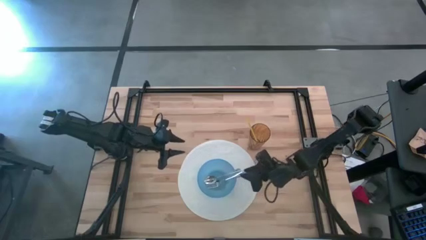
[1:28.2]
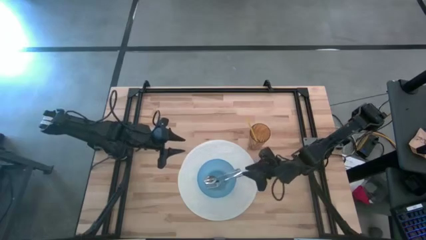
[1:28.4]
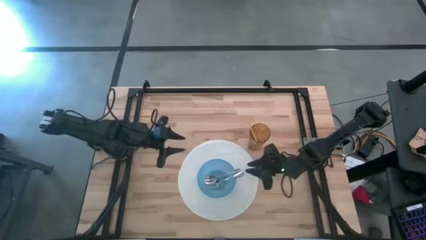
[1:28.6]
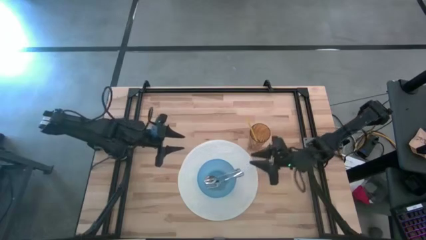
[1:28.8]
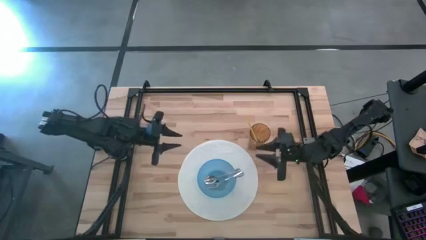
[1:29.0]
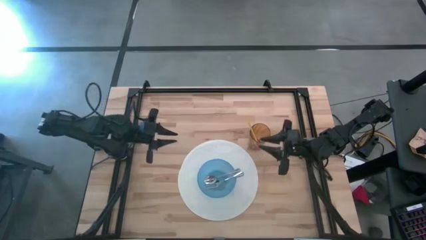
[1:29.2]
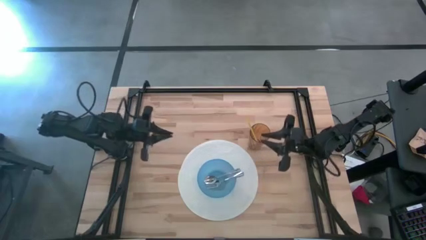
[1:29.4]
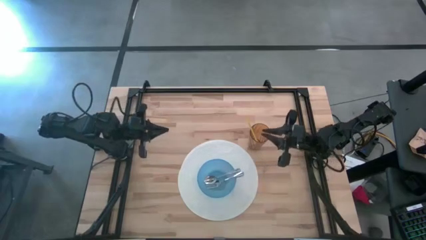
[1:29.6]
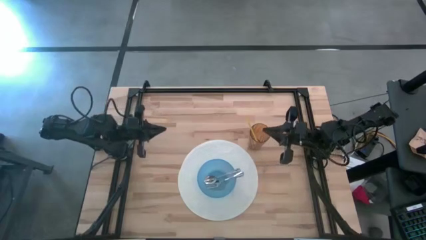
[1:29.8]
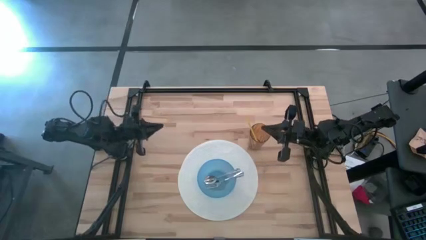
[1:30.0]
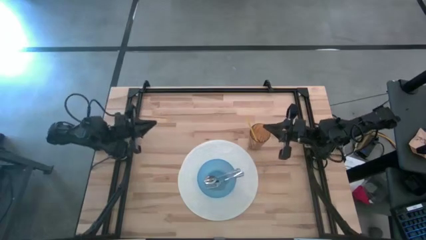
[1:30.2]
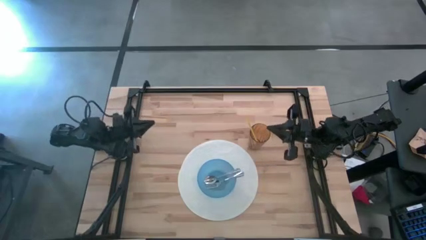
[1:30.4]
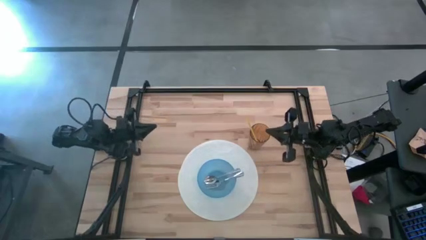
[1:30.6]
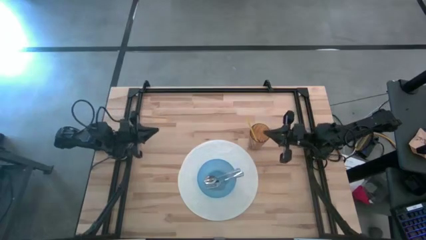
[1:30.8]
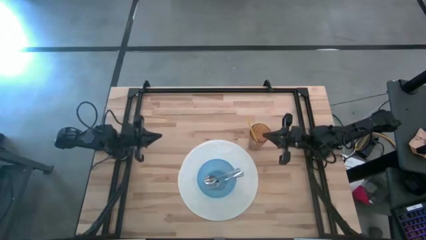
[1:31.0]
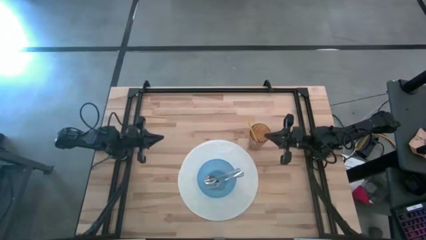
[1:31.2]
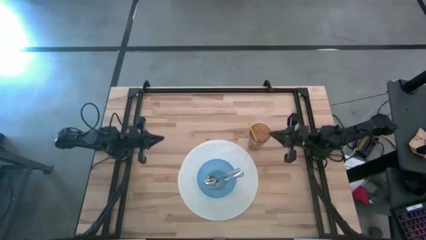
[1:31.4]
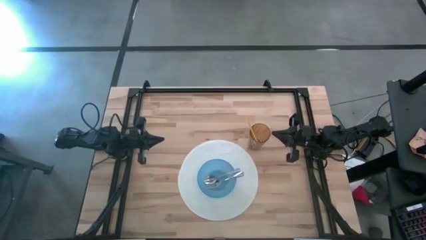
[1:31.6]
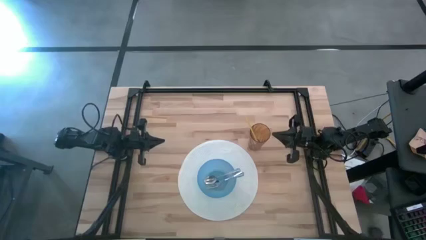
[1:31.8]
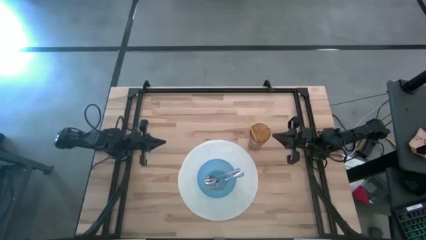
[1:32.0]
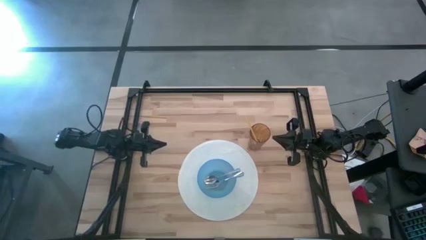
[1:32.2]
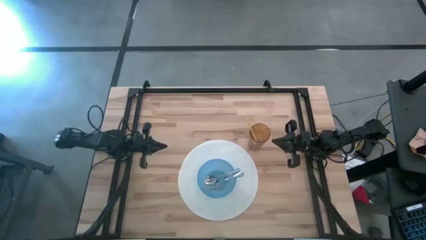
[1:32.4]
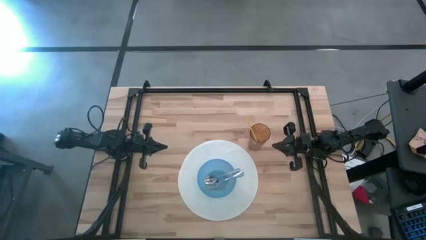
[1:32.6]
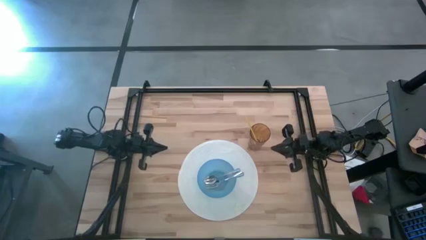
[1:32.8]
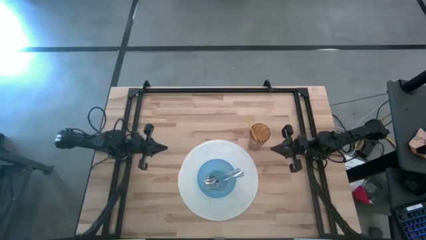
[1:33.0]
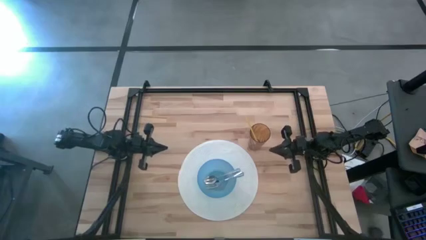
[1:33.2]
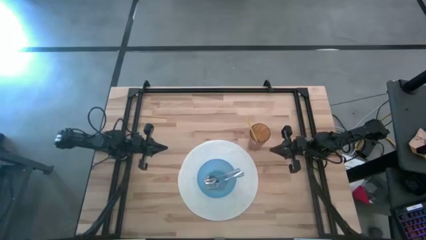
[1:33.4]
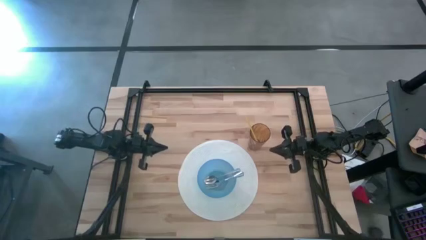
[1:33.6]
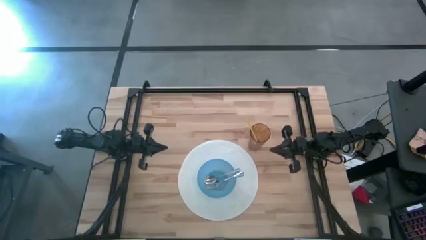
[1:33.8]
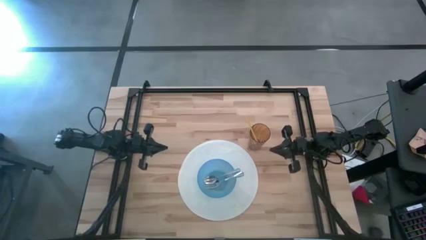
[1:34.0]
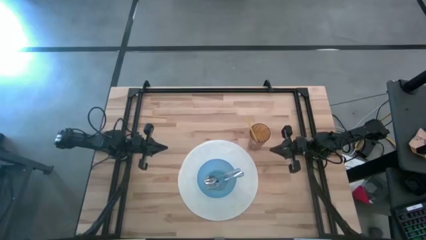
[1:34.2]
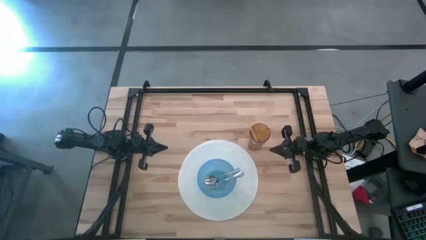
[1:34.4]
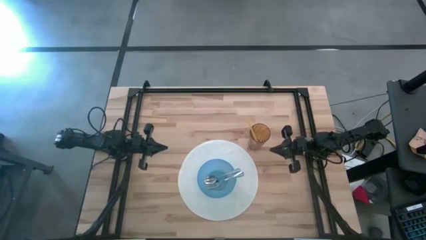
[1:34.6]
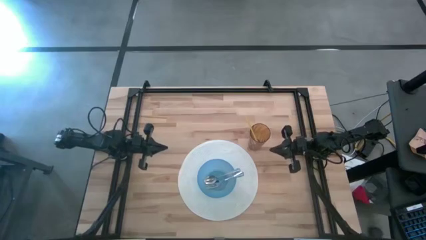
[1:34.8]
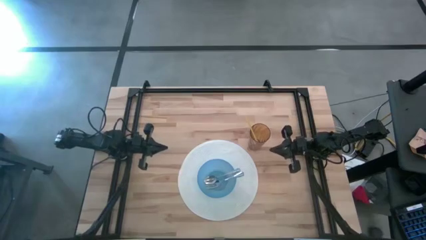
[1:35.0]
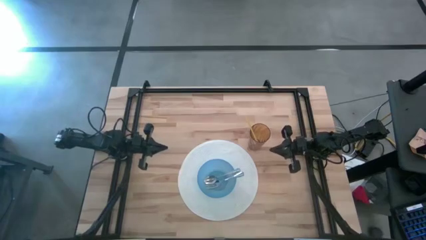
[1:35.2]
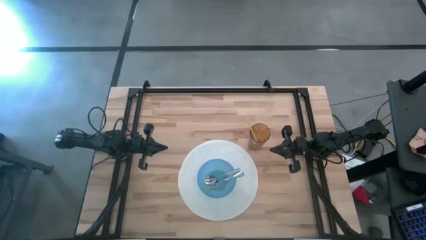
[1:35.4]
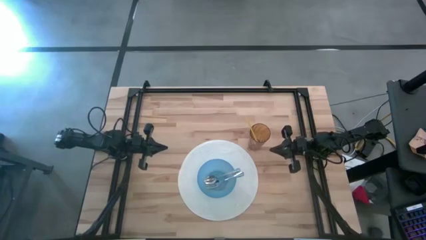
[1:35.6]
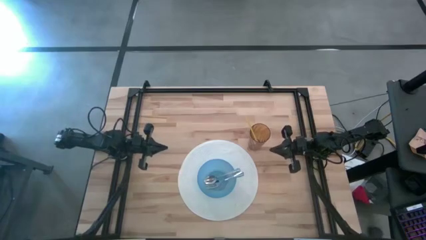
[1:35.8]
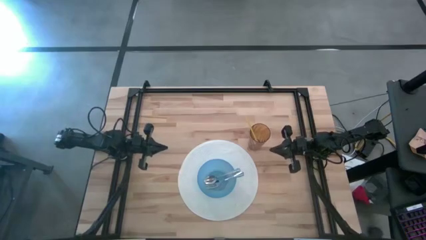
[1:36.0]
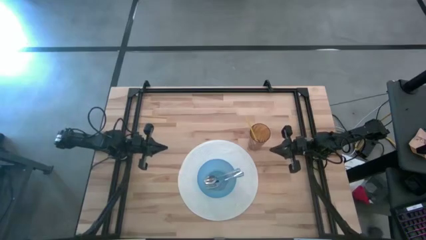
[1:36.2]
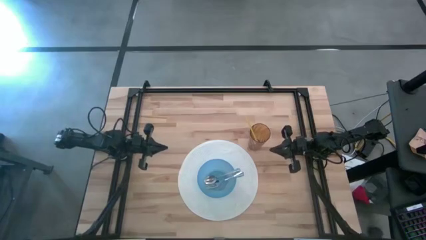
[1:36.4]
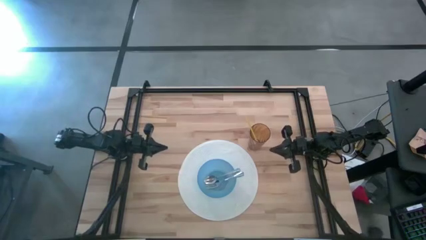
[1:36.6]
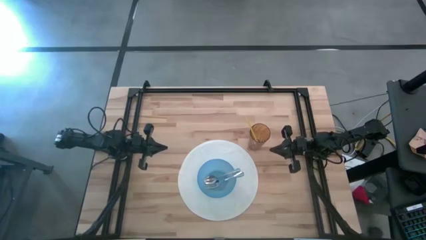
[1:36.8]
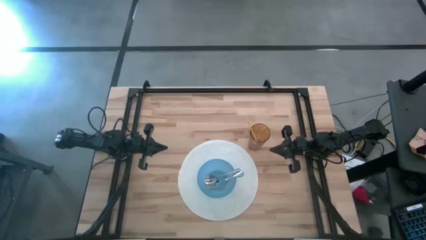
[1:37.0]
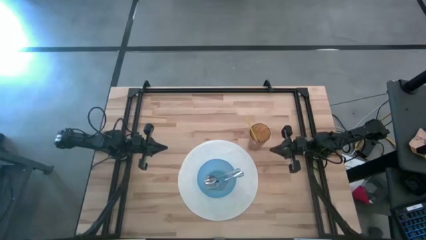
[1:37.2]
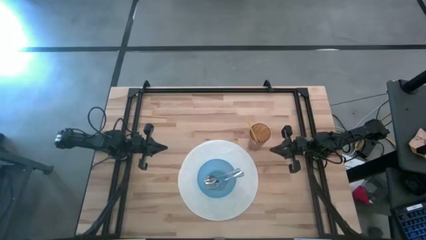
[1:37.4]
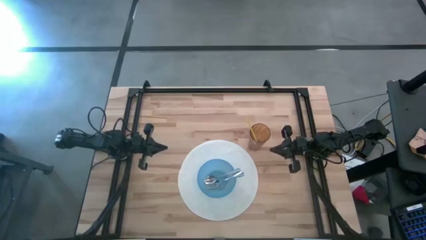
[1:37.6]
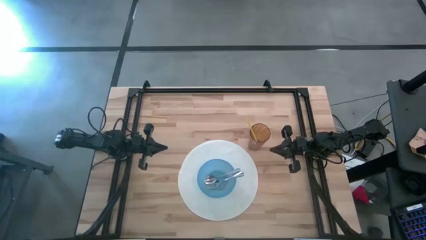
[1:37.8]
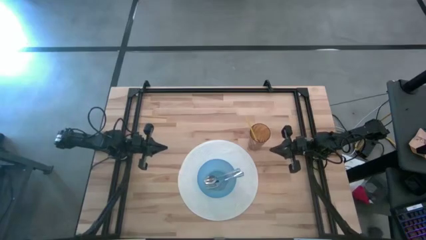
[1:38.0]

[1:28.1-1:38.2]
Task: Pick & Place Utensil
Return to Home Position

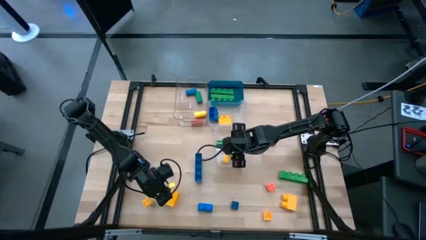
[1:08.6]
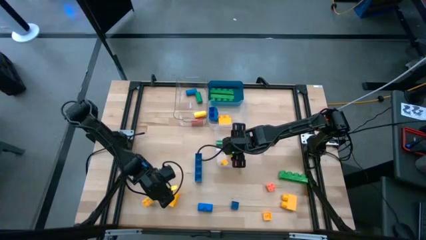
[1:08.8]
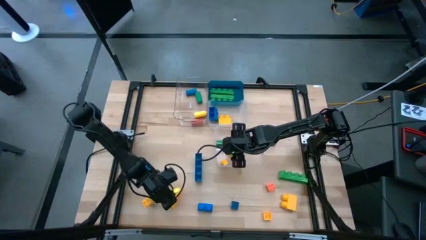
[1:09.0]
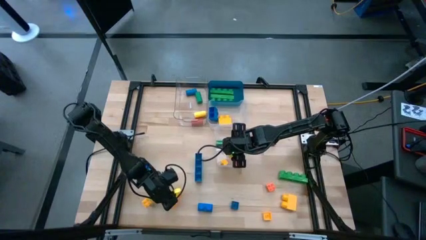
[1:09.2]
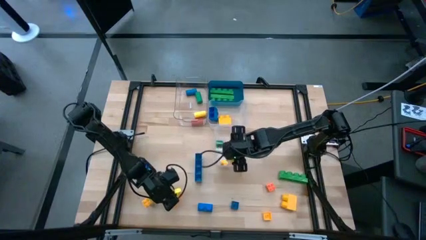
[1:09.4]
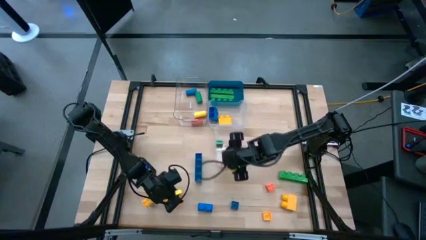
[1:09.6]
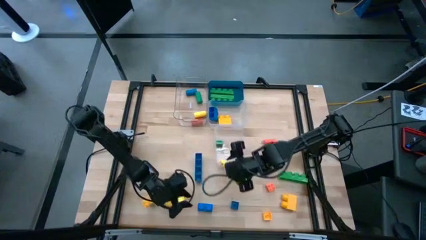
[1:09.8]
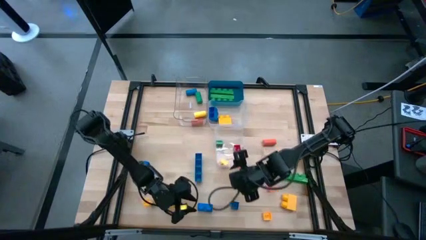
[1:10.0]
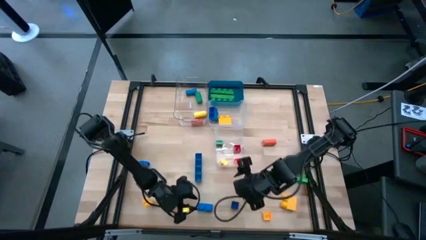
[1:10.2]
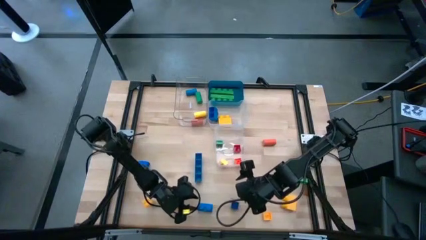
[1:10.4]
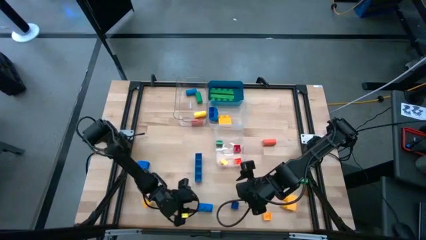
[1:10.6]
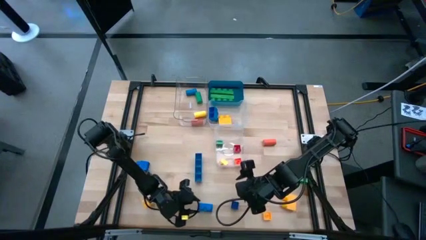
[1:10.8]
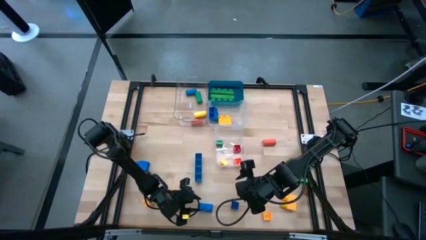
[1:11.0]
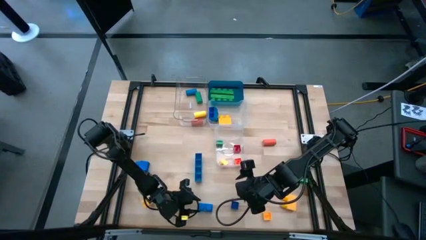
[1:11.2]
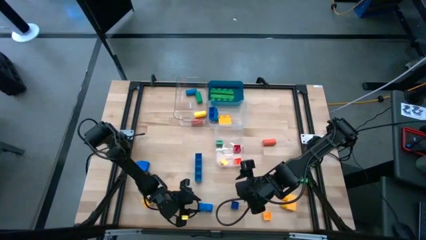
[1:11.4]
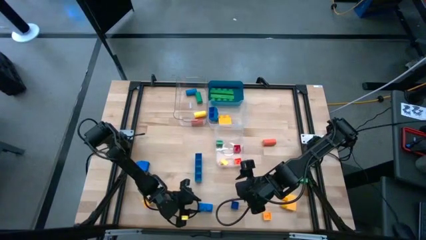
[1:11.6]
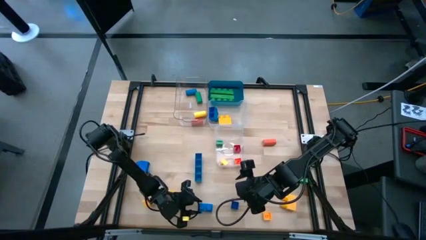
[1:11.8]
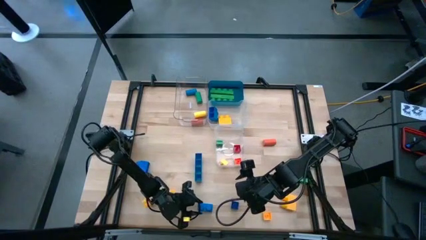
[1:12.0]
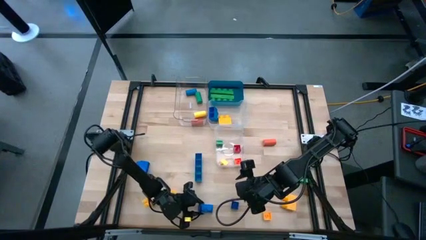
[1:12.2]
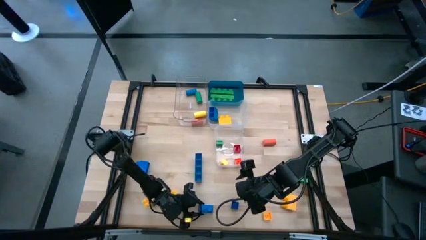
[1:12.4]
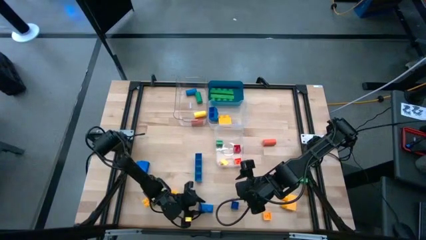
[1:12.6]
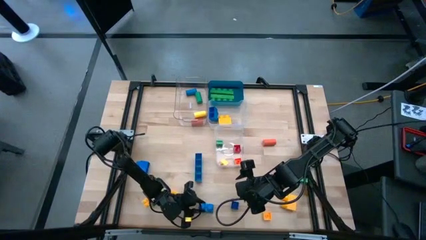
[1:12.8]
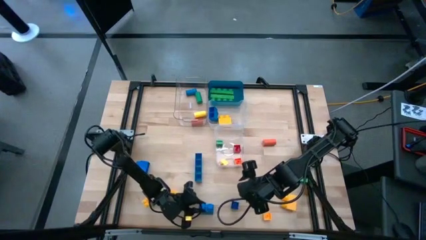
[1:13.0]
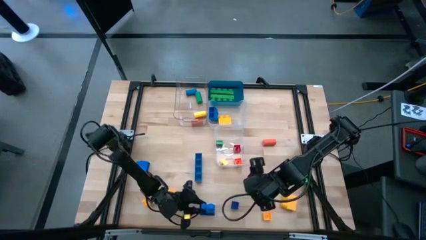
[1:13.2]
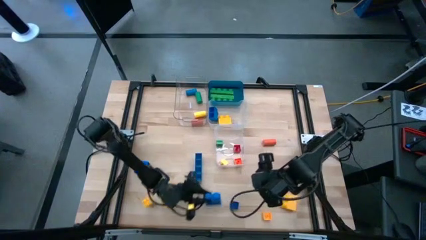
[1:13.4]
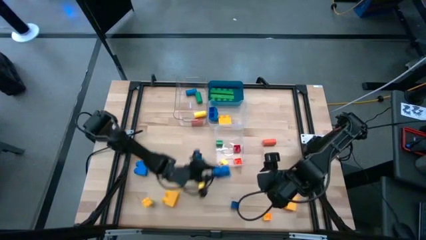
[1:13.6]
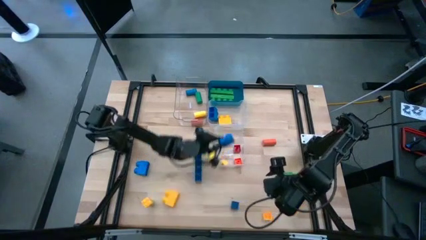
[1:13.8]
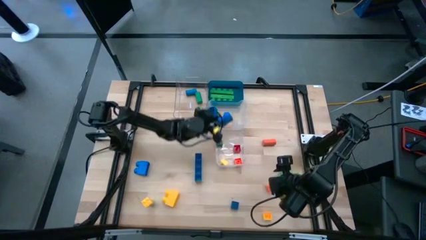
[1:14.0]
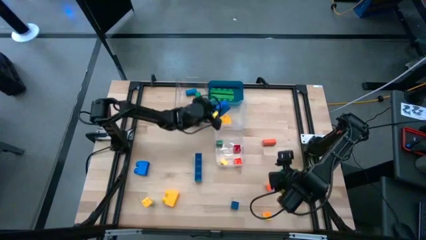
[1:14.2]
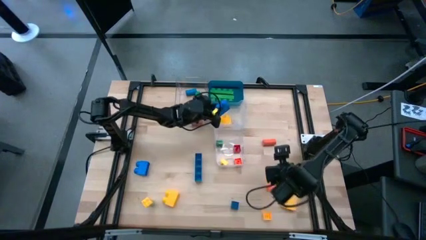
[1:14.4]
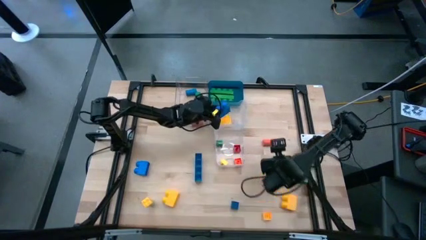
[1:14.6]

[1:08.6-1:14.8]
Task: Sort blocks by size
Put the blue 2 stud game piece into the top right transparent bin

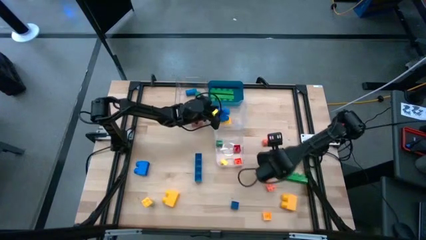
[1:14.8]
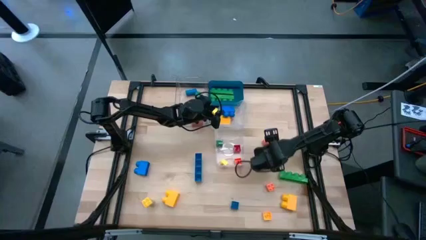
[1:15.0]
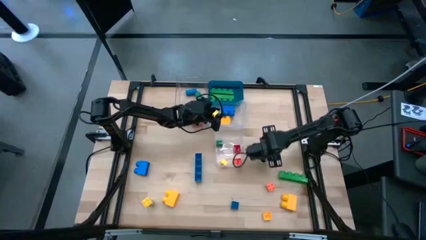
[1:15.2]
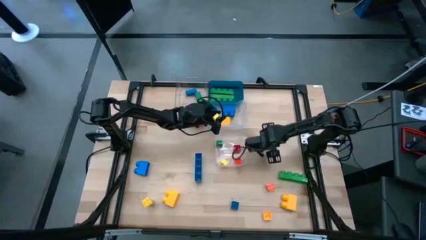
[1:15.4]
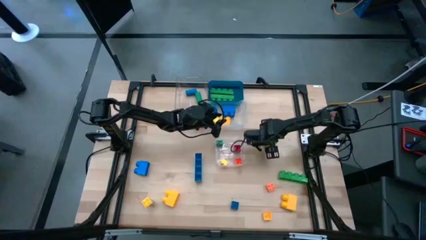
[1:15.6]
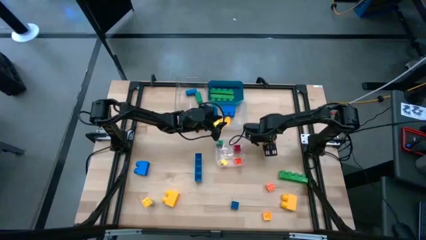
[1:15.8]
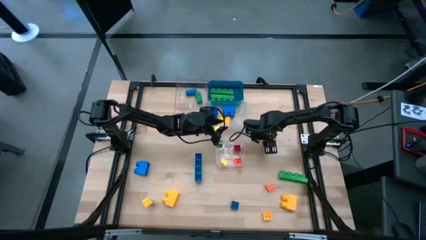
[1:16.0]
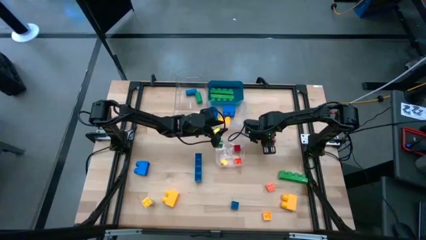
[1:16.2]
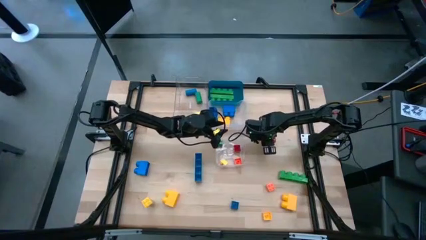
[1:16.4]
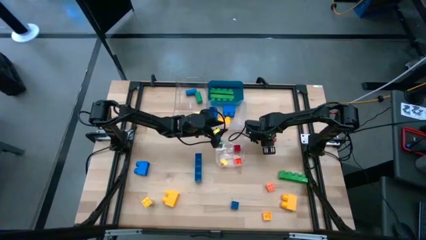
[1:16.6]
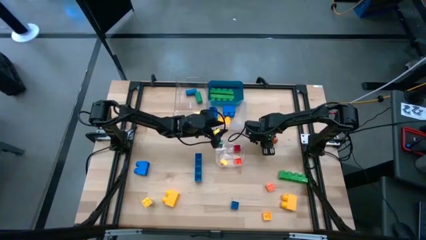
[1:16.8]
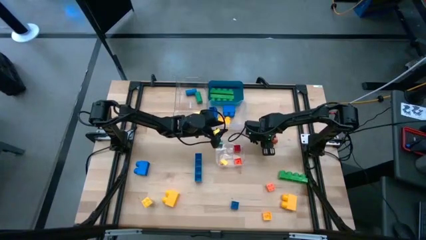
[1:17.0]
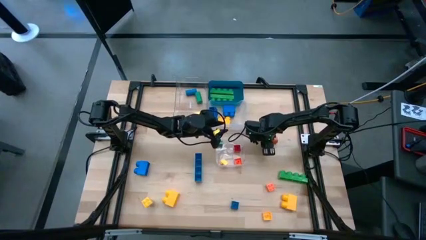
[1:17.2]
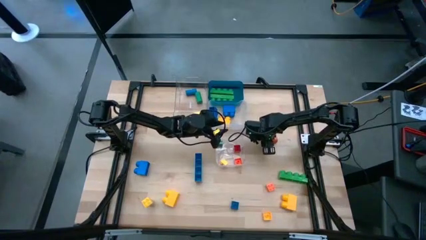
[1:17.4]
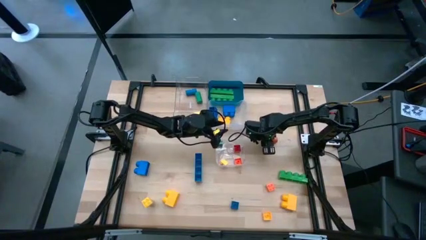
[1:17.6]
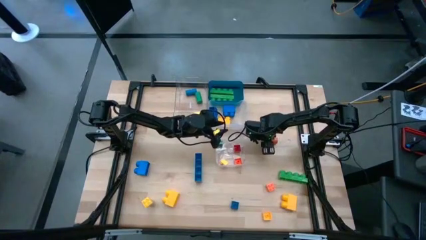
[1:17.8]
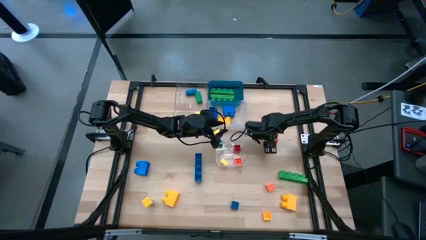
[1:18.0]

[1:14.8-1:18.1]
Put the orange cylindrical block into the top left transparent bin
